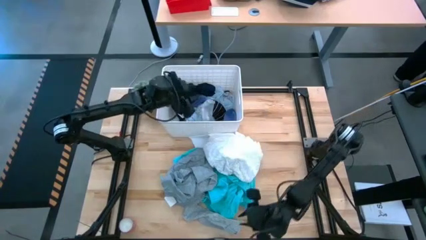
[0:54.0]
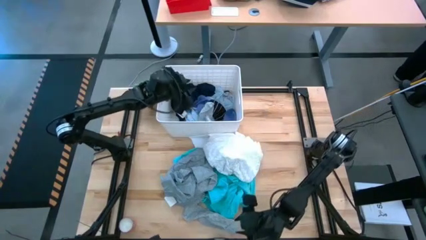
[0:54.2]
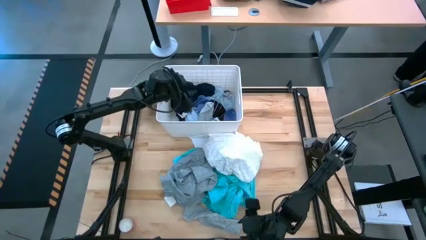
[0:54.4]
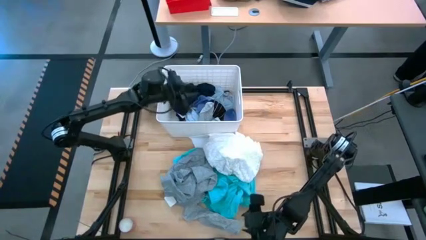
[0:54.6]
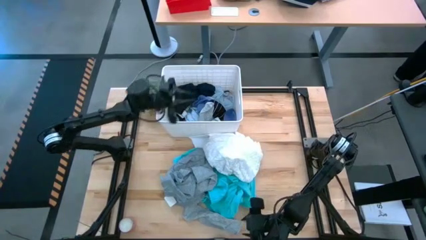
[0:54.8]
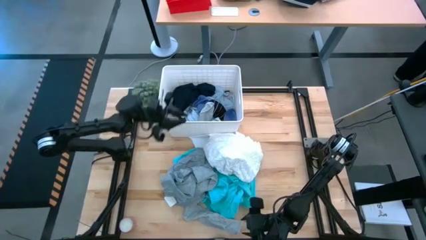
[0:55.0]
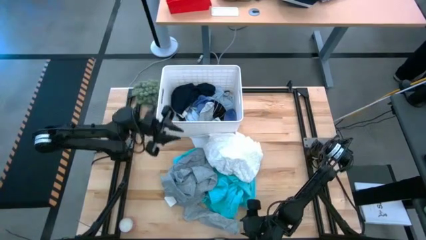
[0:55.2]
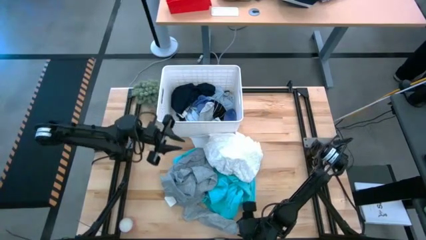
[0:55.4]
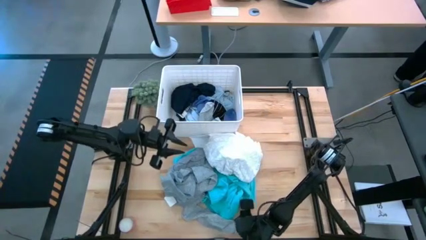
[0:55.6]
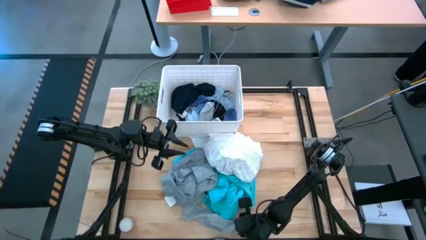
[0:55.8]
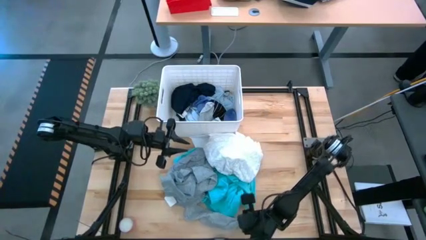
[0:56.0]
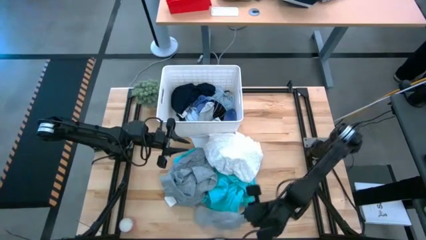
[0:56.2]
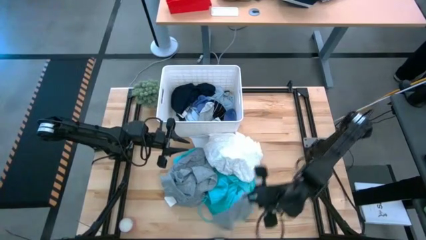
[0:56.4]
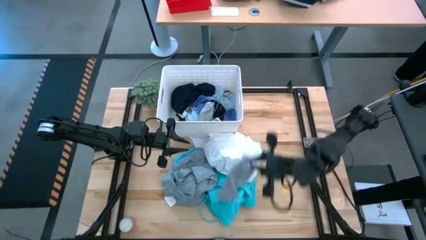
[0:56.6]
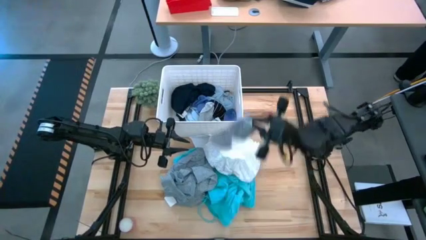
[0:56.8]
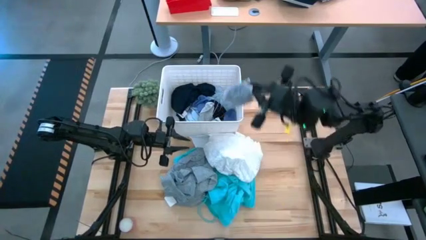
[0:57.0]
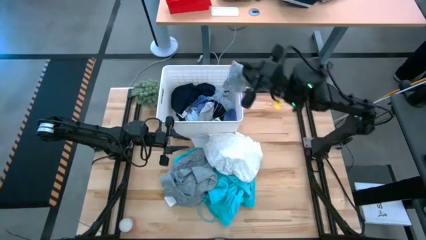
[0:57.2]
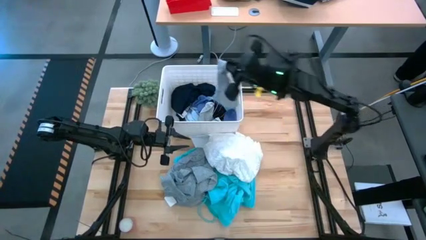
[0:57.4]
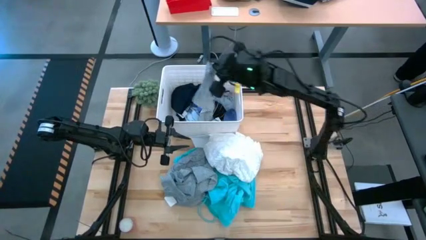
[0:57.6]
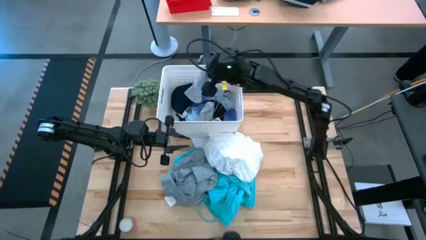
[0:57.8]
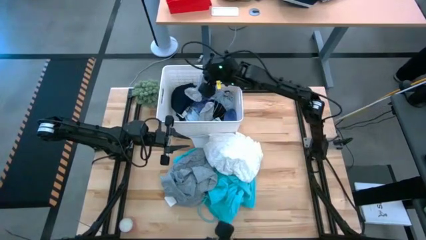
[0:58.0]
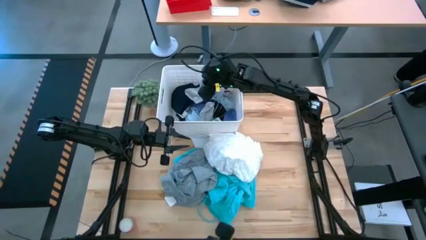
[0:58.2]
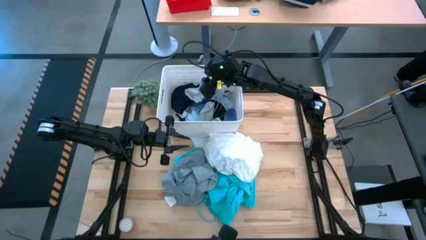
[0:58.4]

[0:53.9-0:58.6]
Task: Sort clothes
Put the gray sock into the white bin

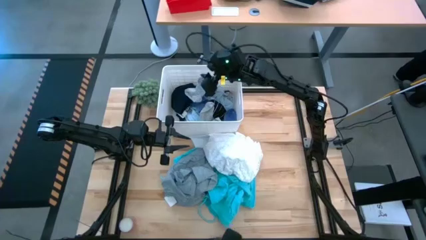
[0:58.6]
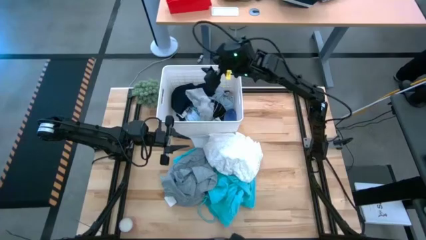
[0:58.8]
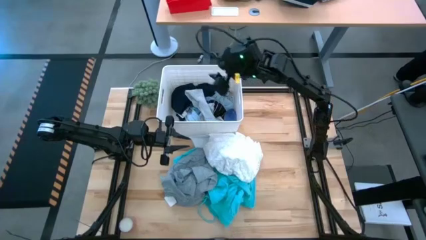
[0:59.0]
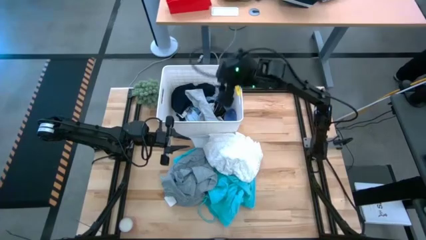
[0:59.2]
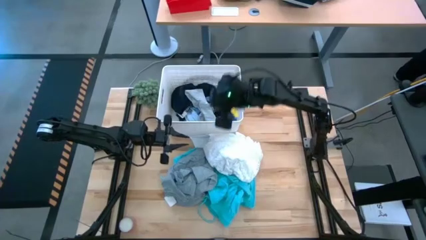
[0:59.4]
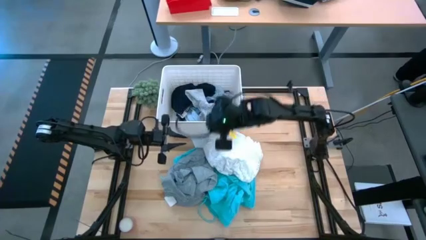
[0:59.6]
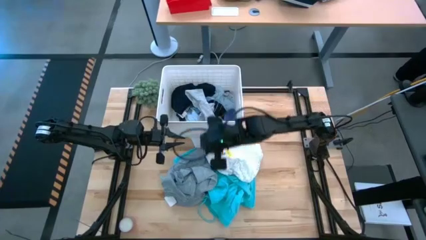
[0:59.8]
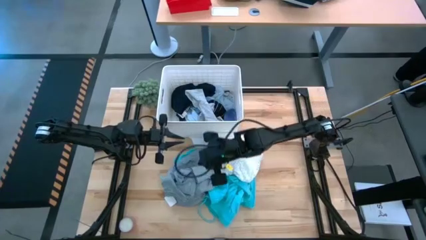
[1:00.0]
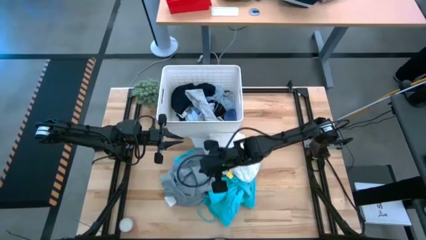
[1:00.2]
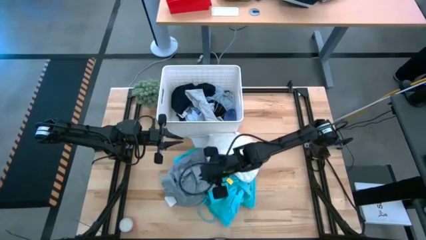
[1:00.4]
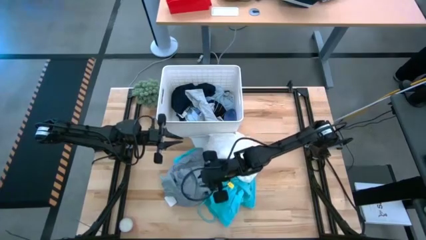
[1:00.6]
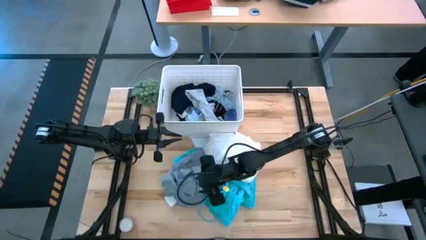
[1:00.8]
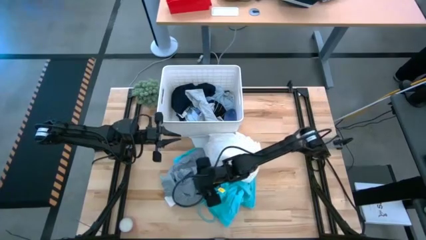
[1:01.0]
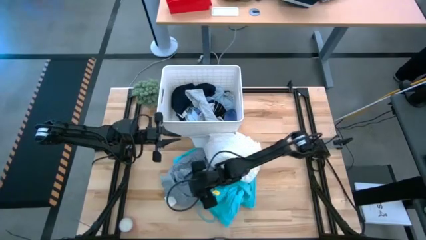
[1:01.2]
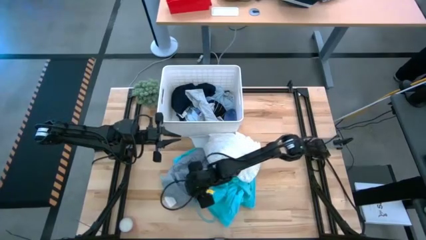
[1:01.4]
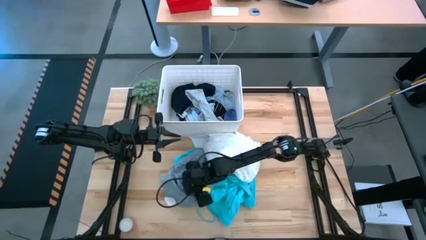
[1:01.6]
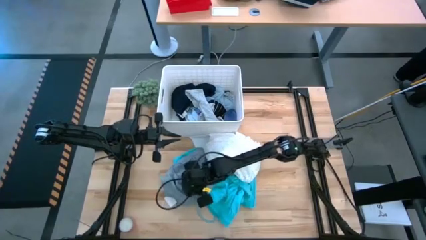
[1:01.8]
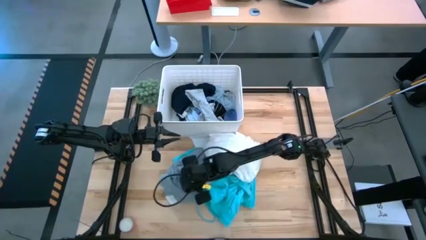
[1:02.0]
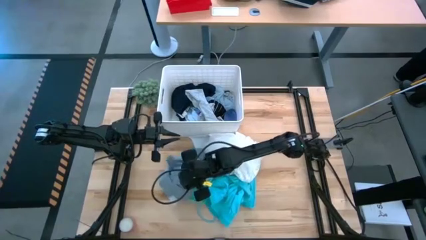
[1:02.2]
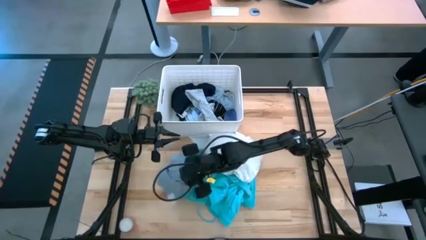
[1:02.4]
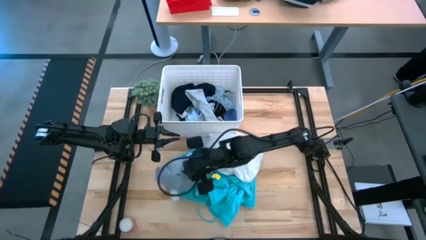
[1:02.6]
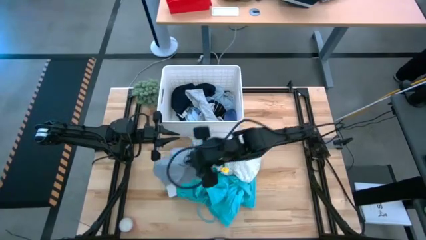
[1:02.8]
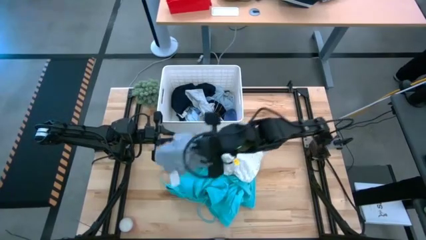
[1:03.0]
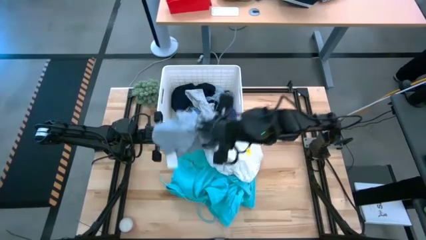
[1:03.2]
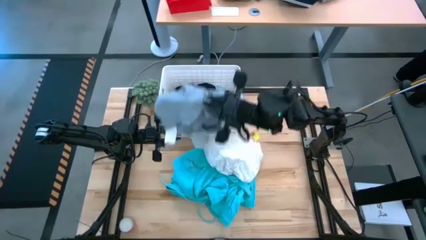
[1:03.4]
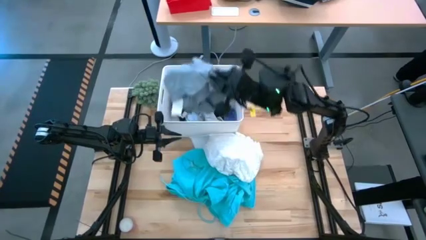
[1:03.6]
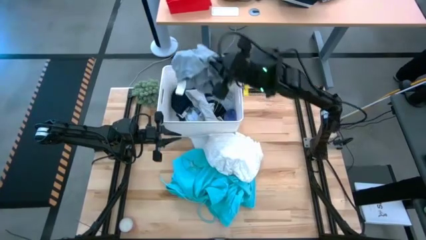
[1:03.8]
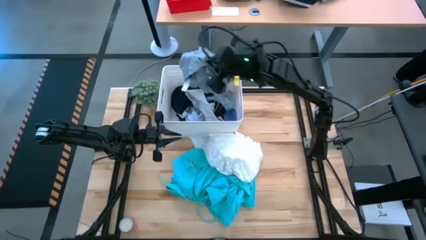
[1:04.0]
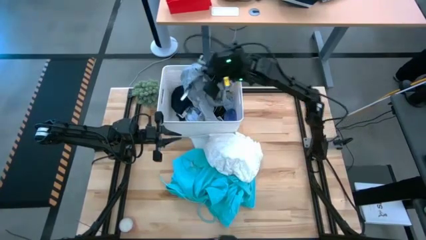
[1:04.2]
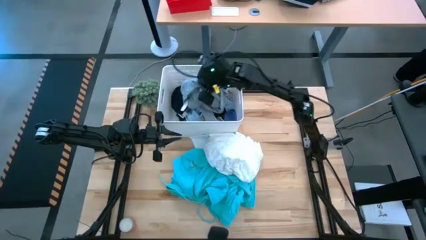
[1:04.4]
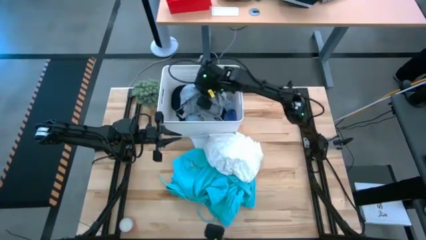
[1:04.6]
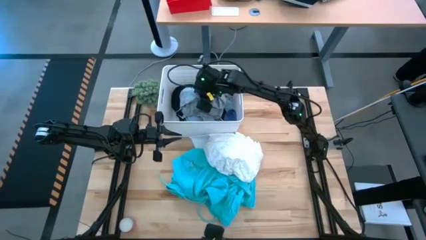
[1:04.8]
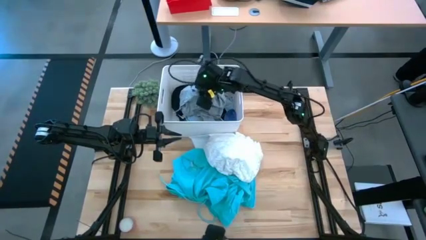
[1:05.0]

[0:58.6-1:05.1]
Put the gray shirt into the white bin

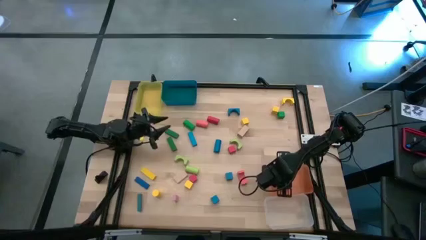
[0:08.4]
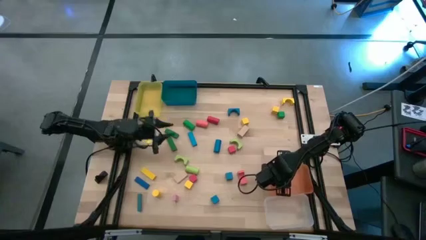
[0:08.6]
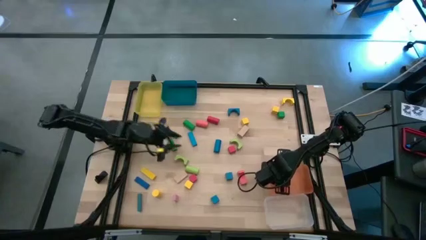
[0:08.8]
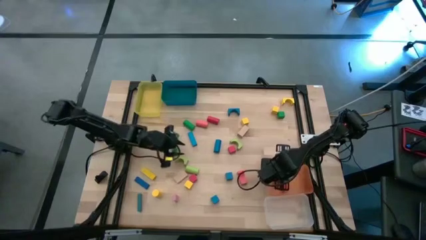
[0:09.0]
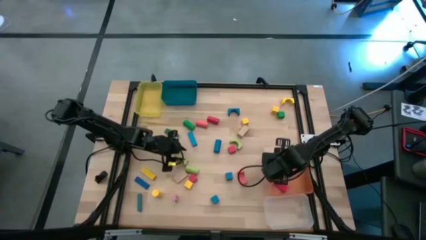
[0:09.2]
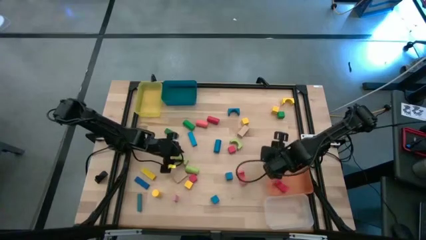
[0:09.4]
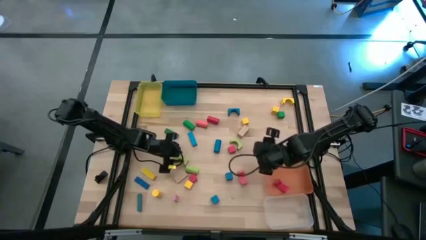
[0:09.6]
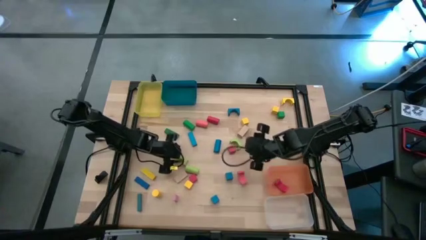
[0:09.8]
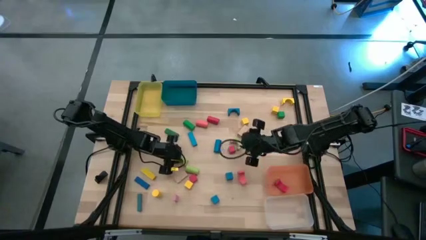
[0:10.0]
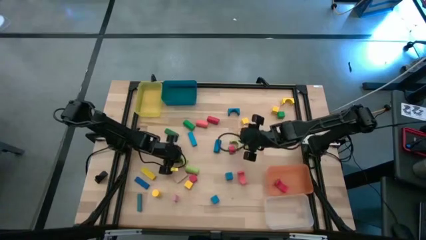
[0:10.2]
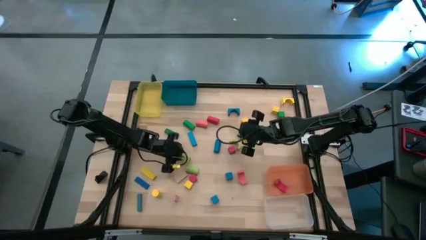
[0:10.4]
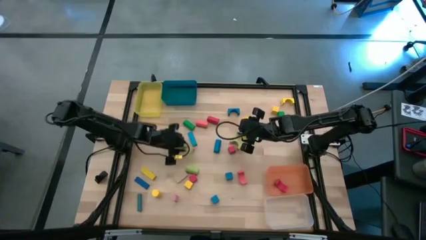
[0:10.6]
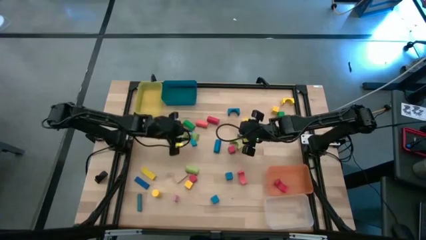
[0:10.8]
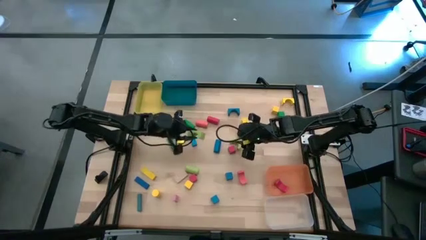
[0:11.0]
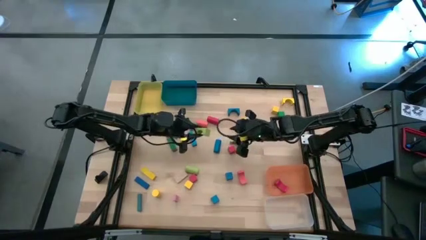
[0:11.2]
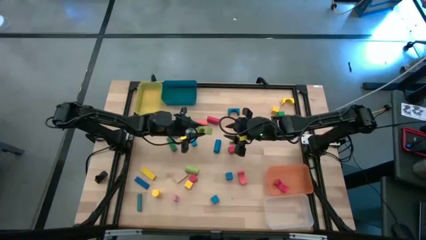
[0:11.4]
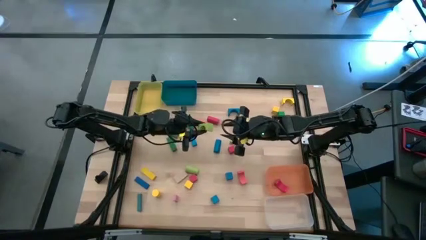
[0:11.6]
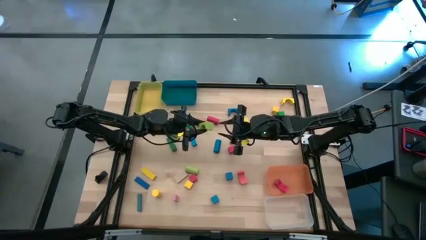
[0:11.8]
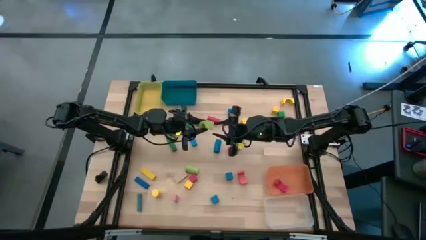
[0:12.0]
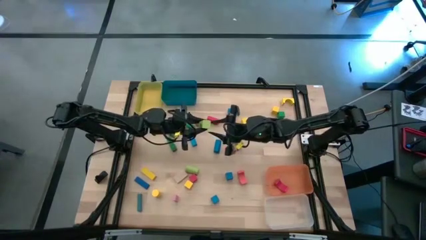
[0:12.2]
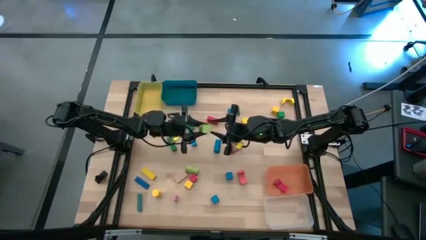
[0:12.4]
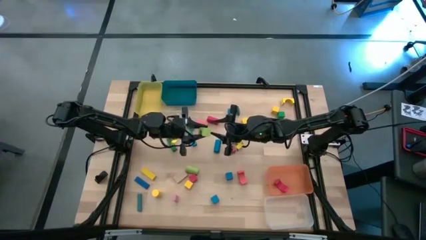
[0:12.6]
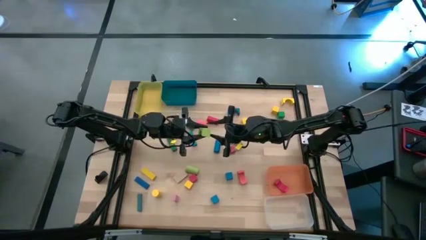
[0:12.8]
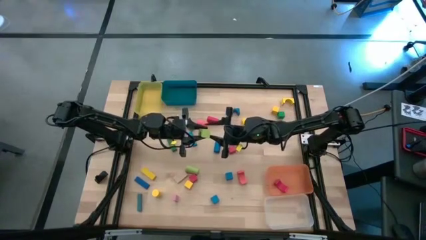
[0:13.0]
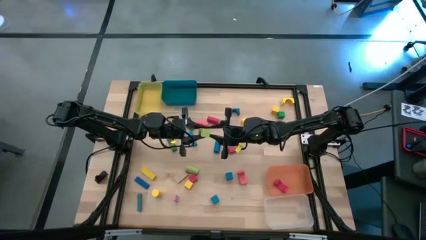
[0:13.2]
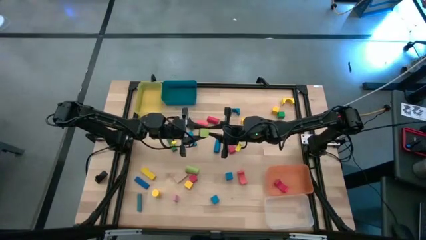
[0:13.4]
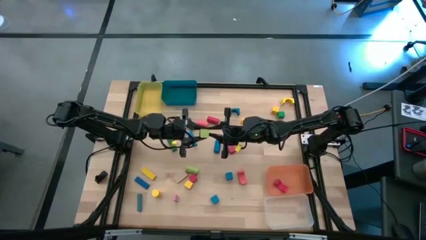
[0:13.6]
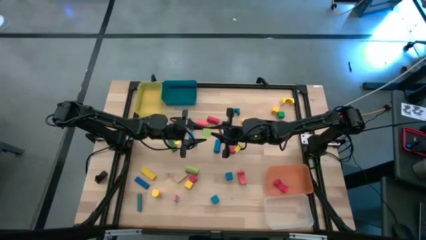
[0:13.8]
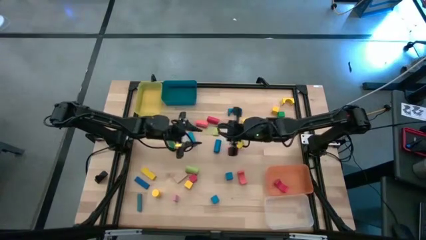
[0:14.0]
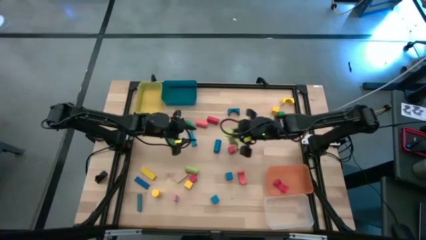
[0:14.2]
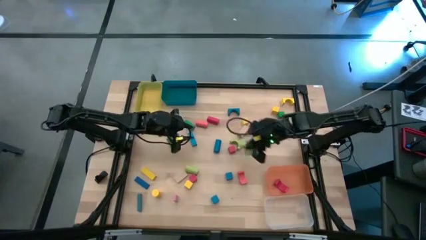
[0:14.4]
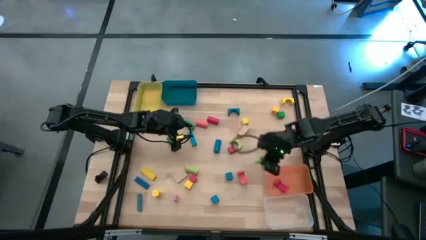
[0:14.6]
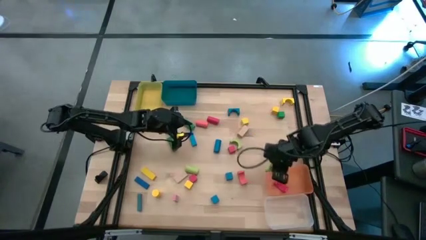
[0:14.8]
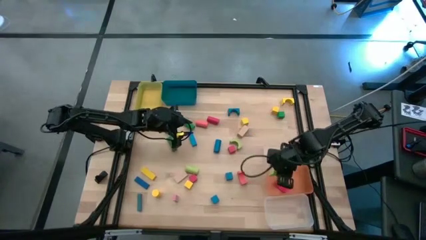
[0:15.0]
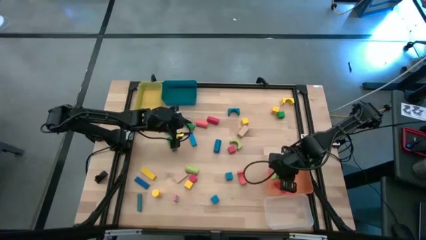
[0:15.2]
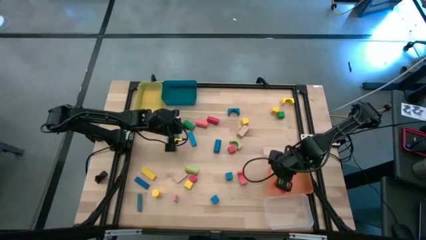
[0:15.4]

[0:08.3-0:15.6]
Task: Sort blocks by size
Put the light green arch block into the orange bin
